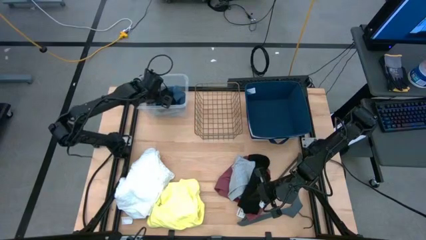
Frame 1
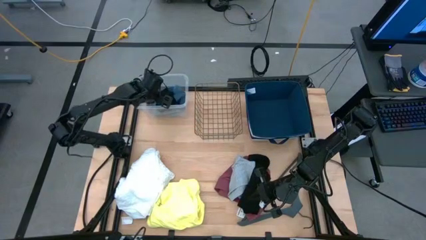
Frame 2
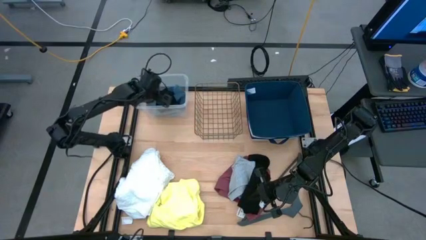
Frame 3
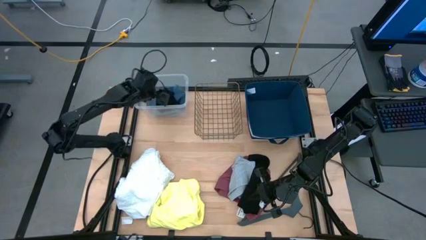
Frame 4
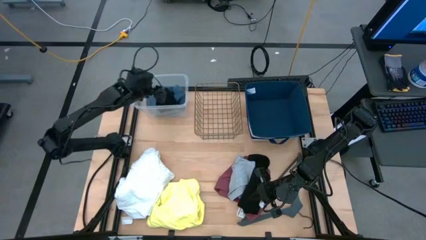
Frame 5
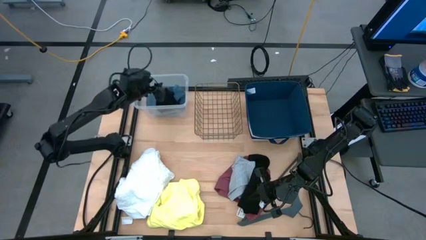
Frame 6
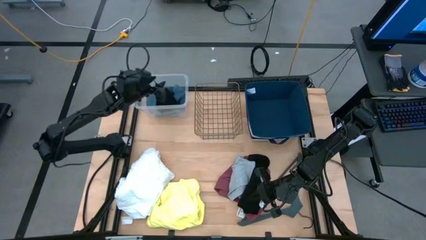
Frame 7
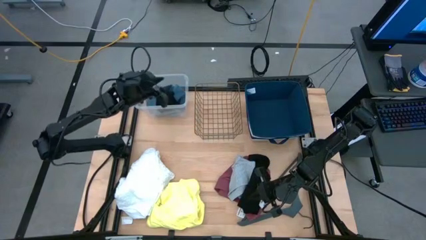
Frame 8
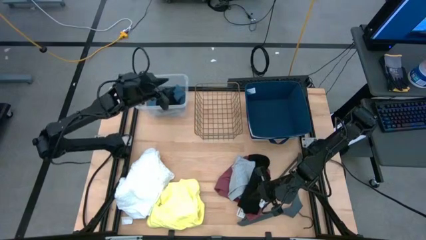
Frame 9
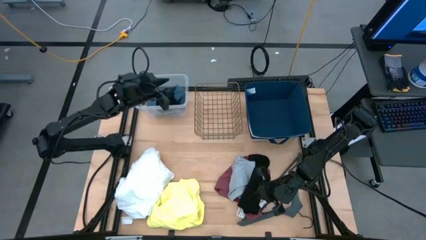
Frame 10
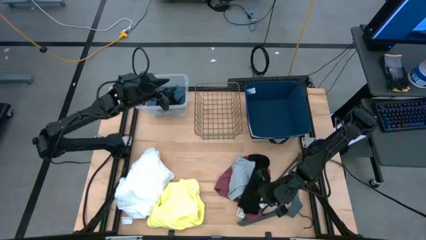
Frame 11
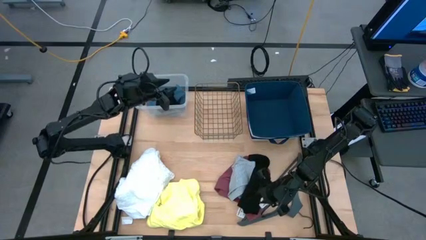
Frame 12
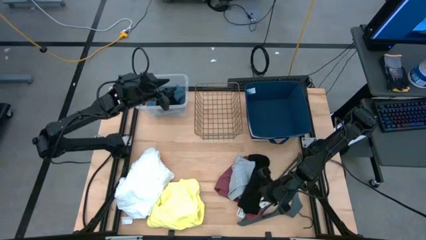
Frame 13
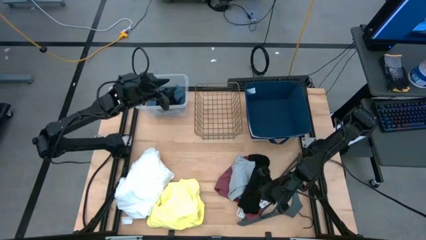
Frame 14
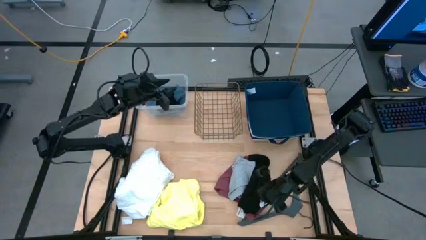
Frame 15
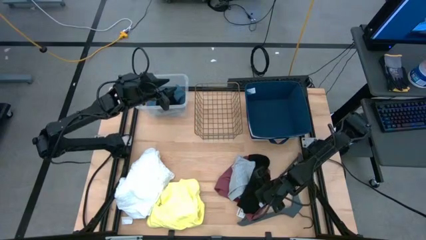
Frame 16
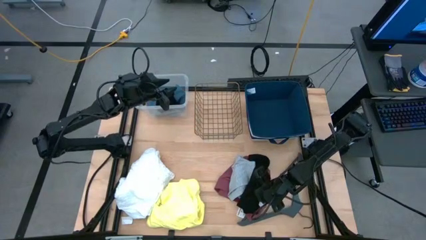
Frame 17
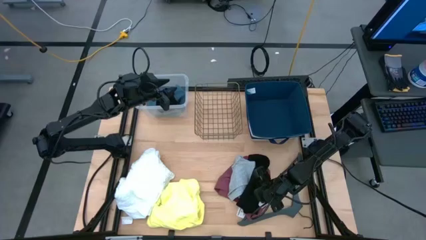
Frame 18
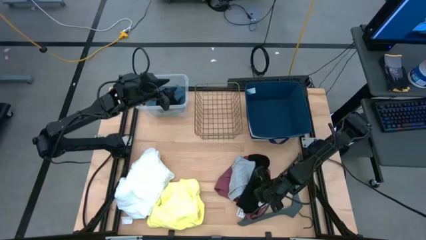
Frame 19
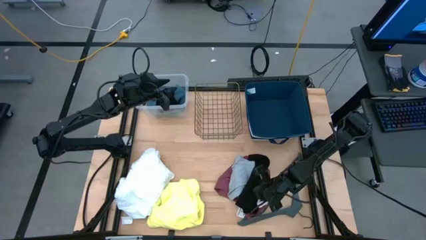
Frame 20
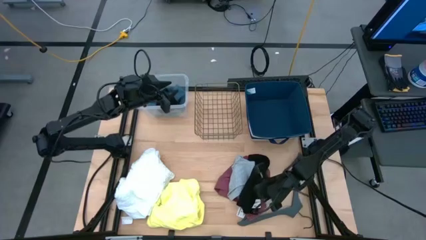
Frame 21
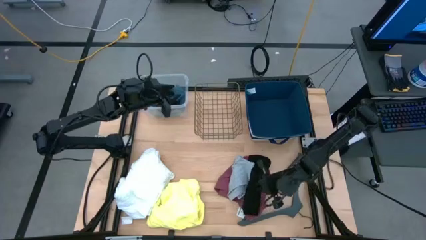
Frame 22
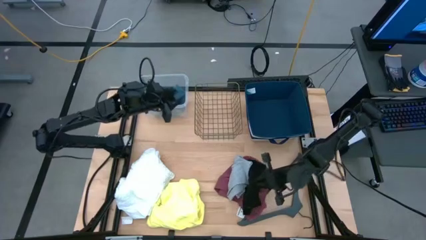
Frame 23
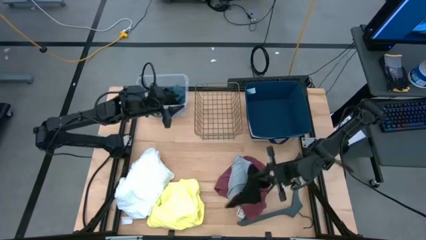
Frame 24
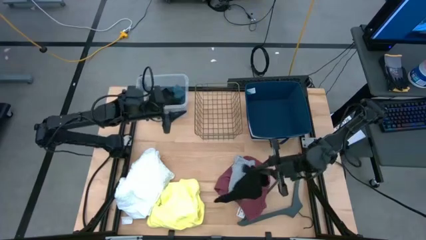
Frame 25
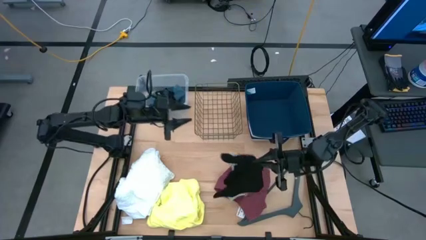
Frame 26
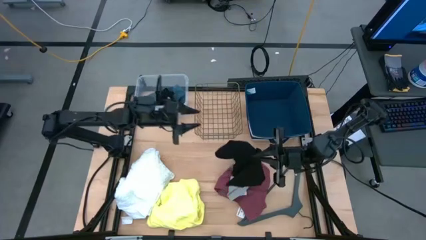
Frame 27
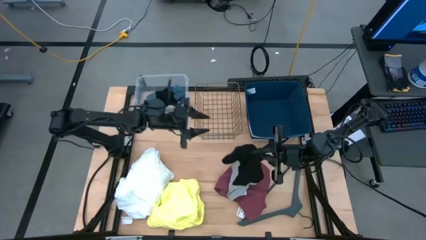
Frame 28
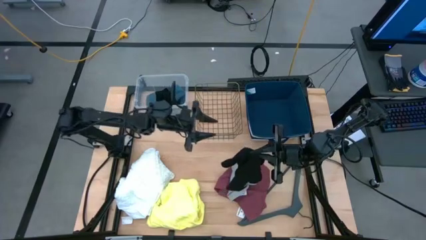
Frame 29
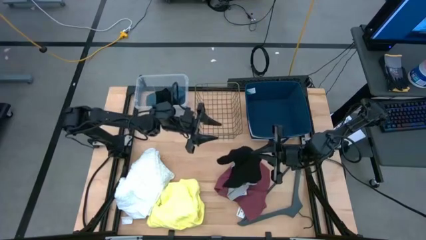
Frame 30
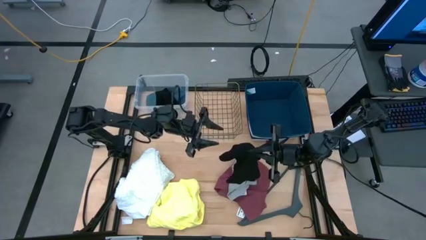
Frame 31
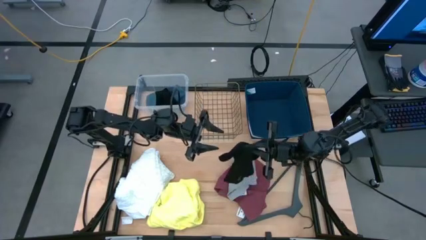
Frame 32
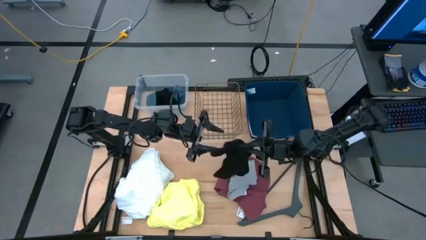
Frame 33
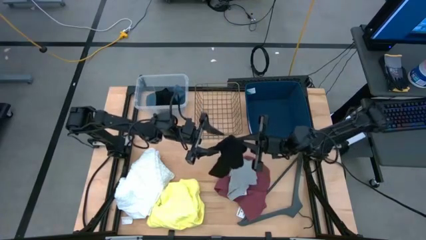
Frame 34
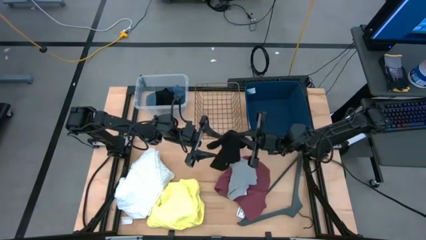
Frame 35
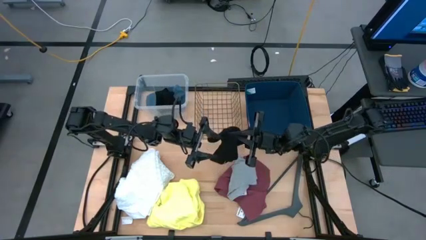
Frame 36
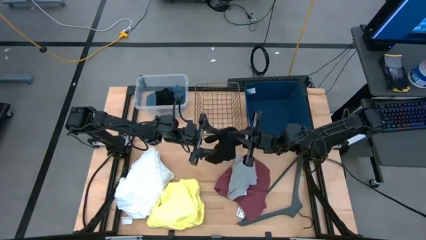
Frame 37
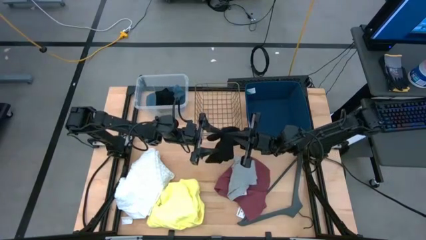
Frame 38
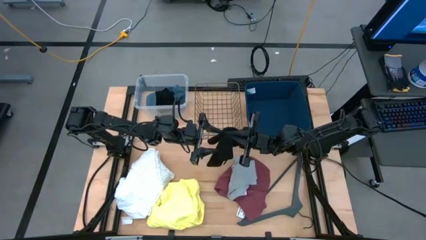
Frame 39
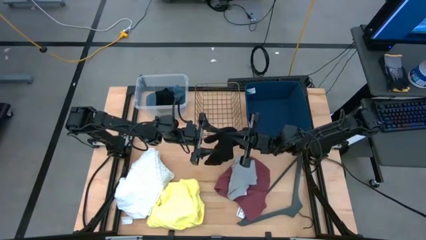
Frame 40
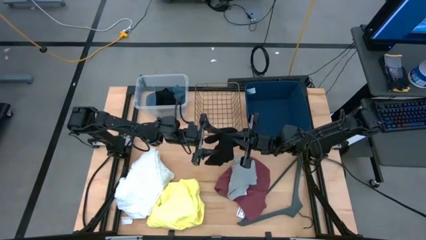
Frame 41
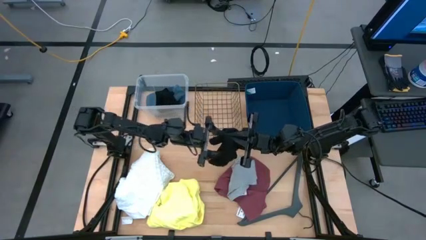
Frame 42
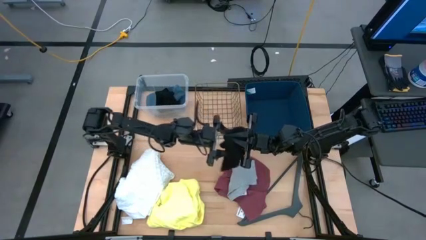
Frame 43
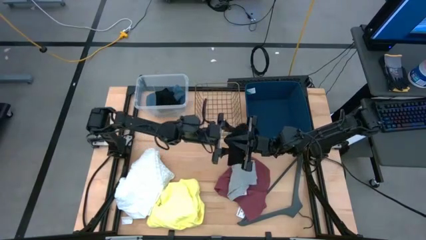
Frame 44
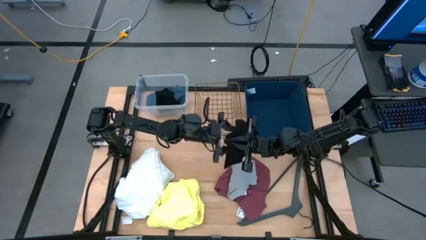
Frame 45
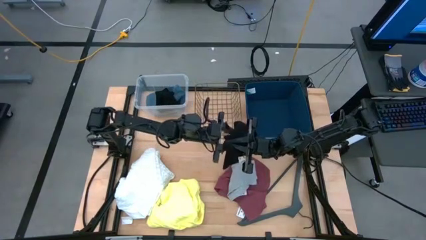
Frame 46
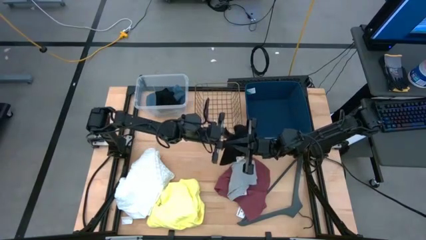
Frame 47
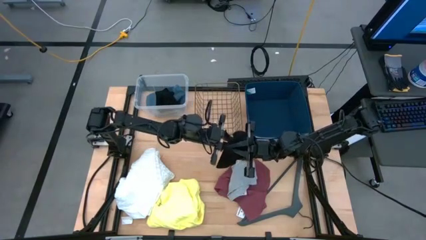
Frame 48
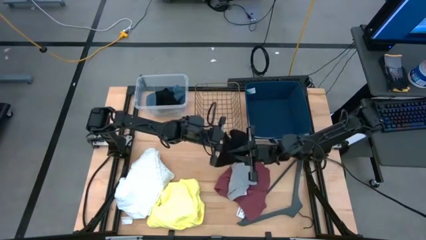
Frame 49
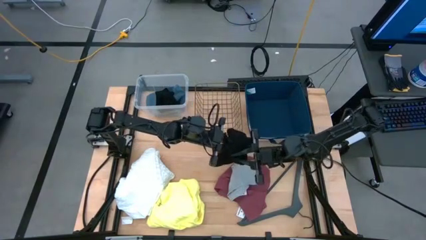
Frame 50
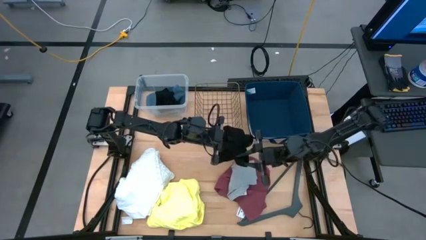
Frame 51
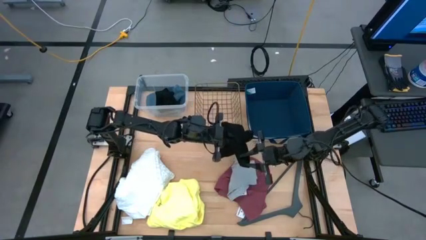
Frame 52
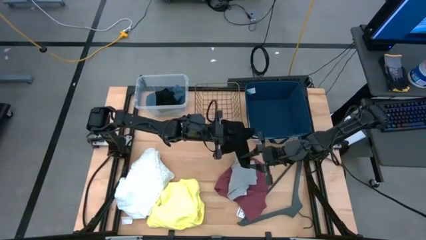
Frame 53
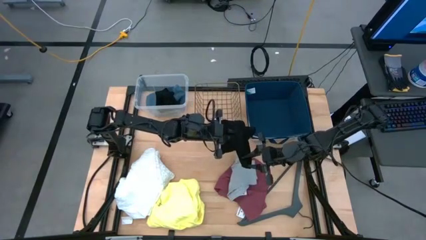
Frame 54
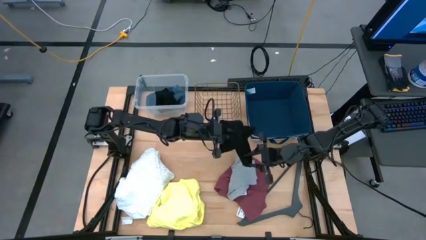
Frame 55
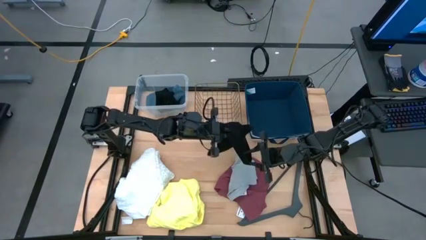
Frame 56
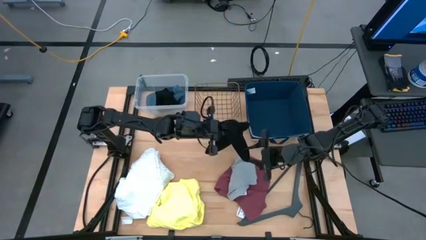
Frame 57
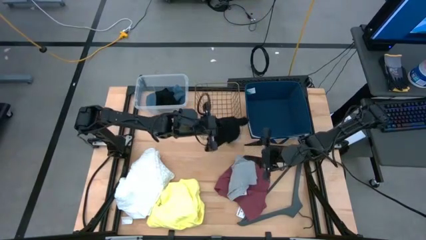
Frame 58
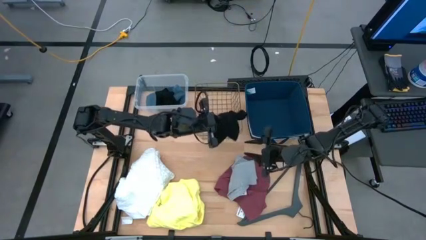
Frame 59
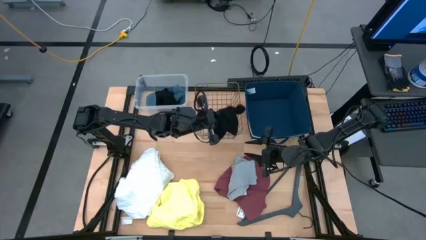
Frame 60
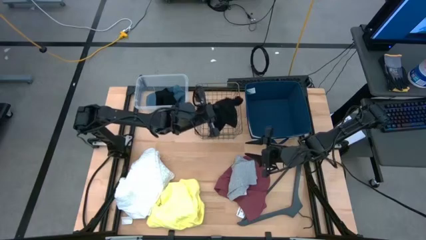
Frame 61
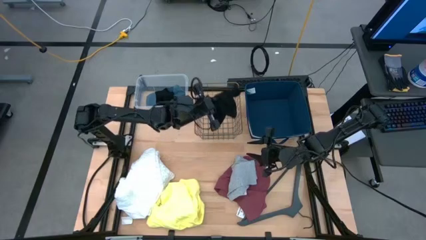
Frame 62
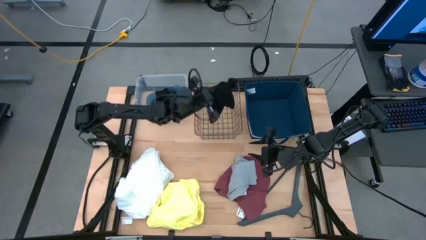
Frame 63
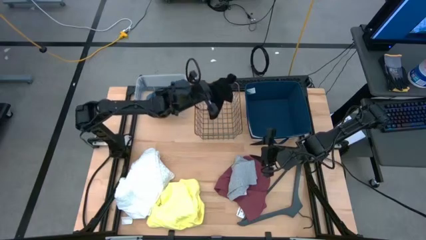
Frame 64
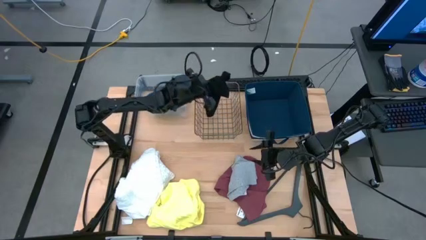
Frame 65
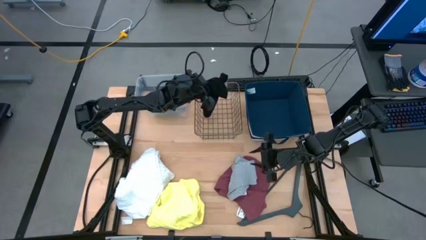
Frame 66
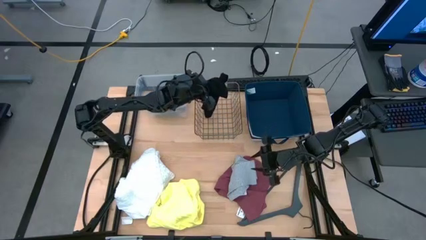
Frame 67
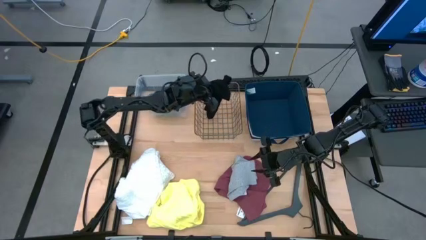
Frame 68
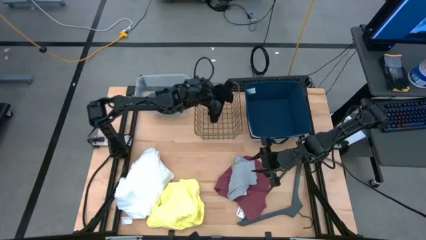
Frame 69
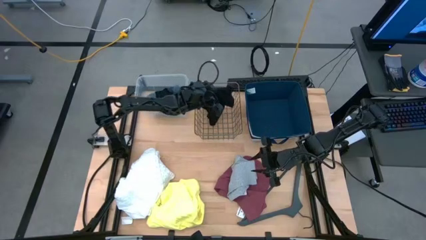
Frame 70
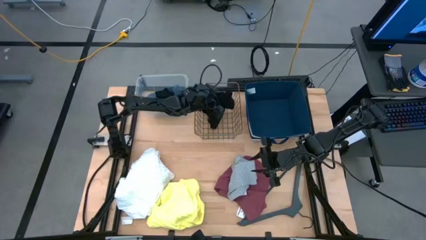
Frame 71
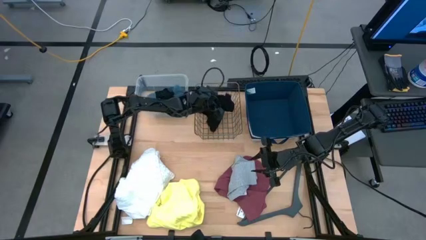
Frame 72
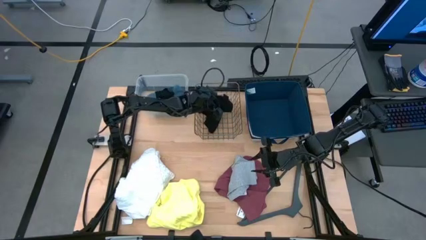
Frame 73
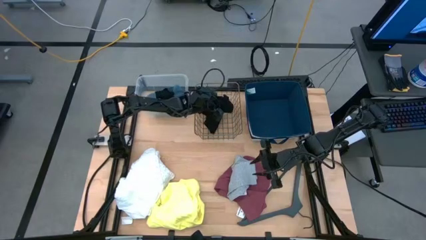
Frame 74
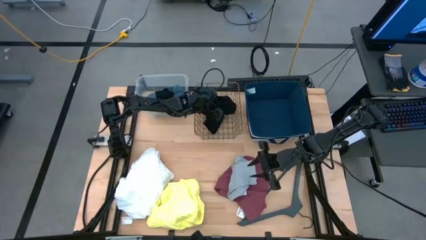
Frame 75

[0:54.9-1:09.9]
Task: Pick & Place Cloths
Put the black short into the gold wire basket
